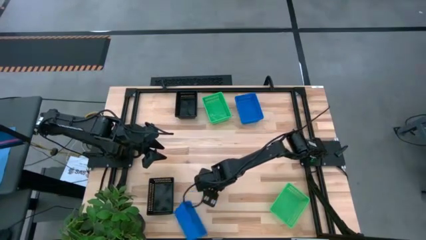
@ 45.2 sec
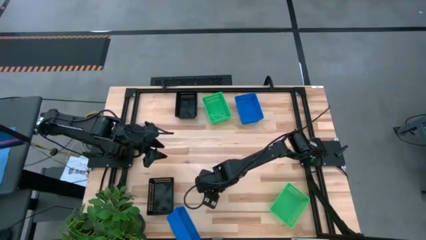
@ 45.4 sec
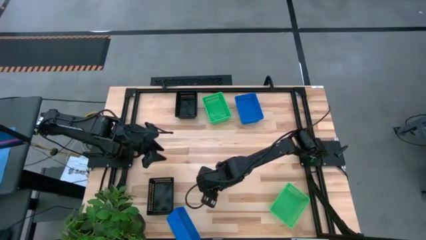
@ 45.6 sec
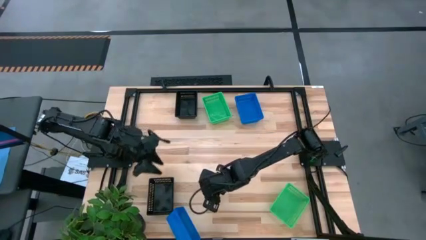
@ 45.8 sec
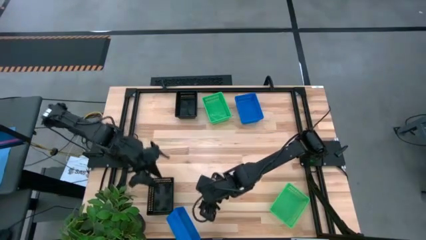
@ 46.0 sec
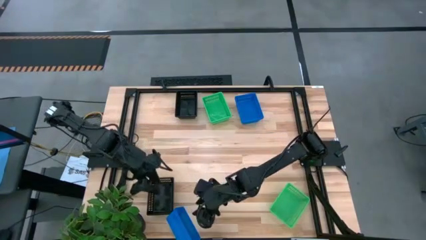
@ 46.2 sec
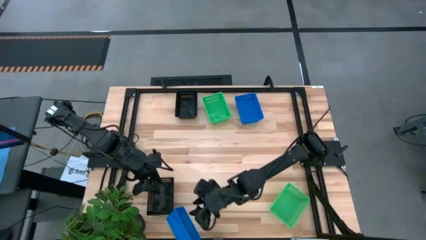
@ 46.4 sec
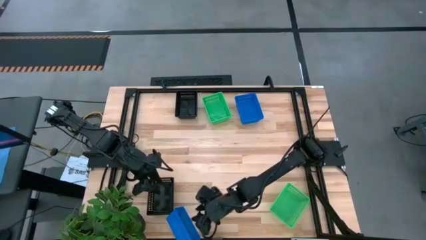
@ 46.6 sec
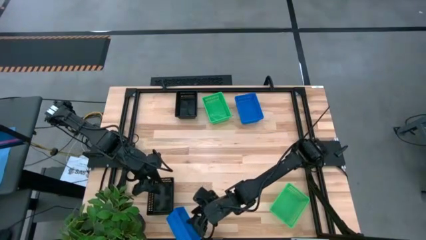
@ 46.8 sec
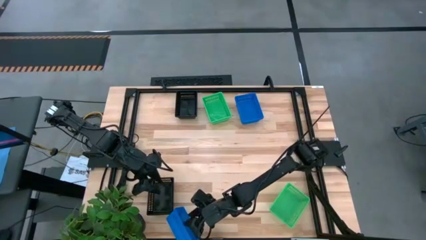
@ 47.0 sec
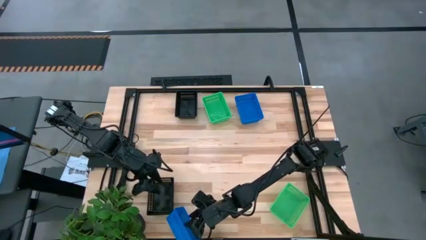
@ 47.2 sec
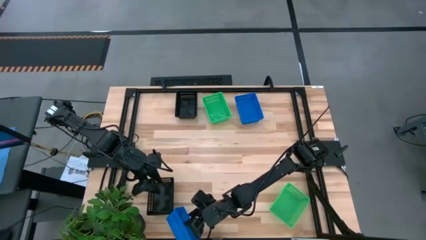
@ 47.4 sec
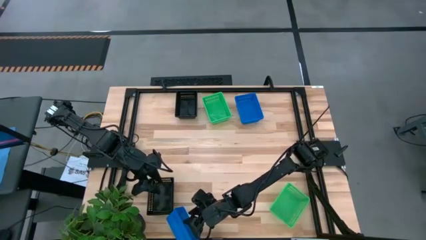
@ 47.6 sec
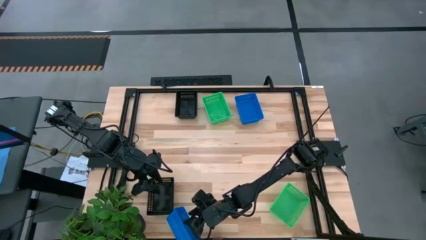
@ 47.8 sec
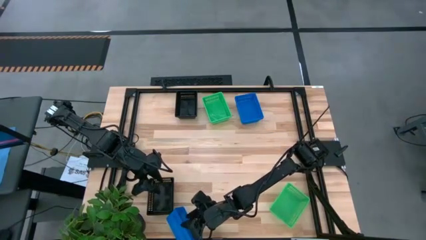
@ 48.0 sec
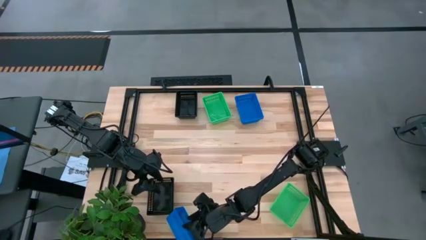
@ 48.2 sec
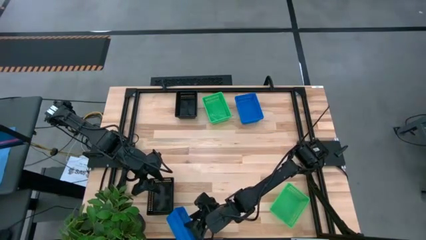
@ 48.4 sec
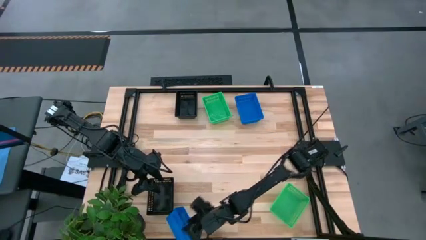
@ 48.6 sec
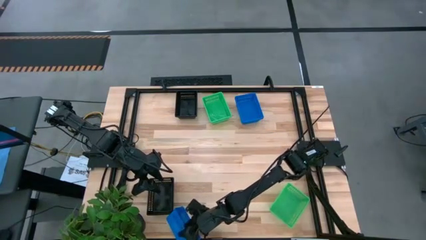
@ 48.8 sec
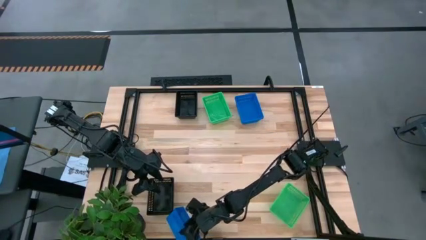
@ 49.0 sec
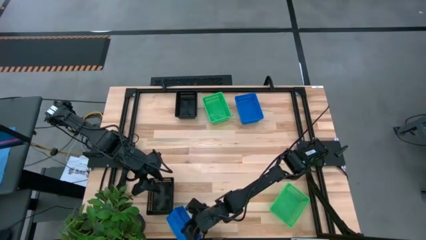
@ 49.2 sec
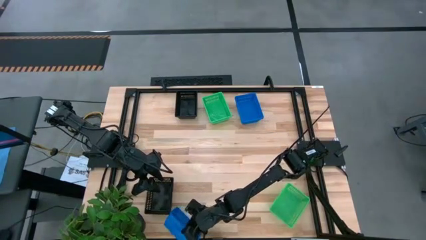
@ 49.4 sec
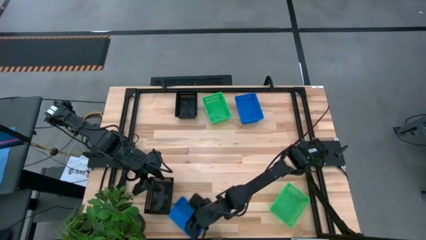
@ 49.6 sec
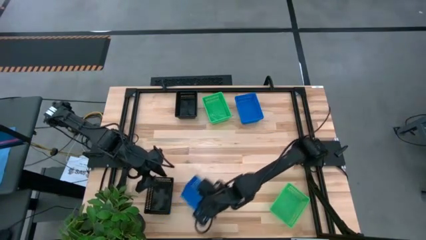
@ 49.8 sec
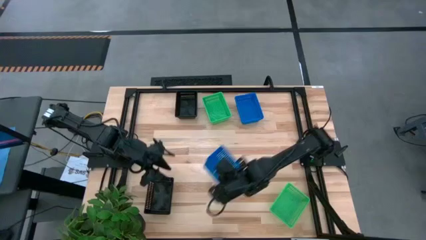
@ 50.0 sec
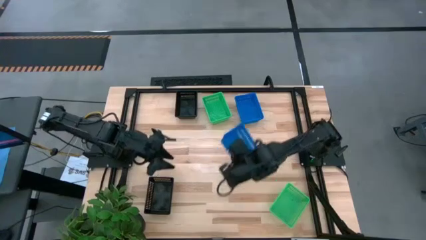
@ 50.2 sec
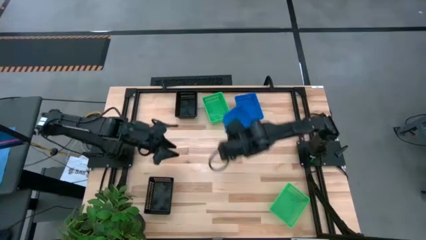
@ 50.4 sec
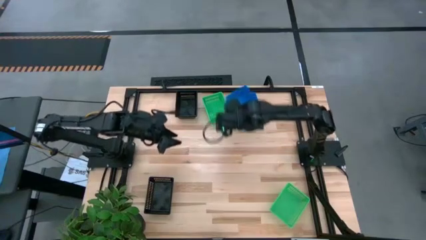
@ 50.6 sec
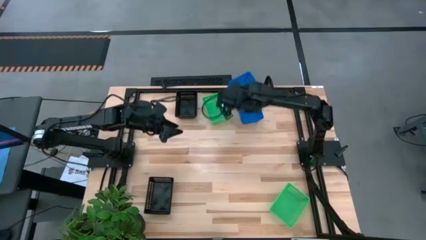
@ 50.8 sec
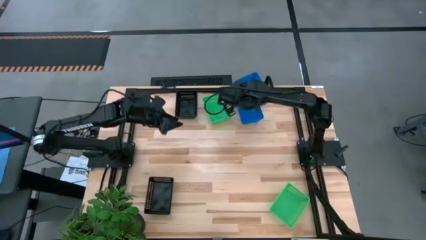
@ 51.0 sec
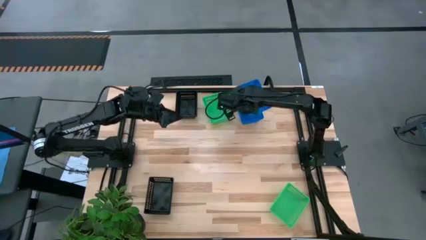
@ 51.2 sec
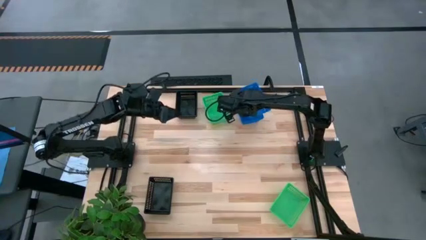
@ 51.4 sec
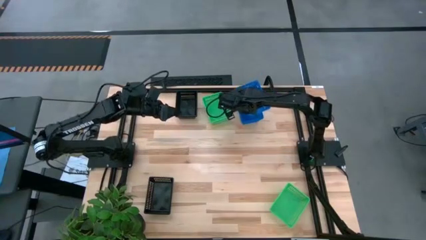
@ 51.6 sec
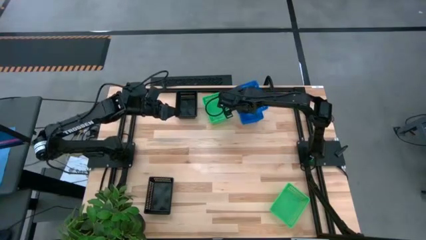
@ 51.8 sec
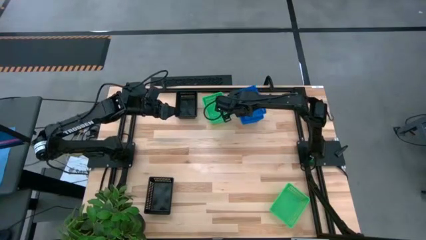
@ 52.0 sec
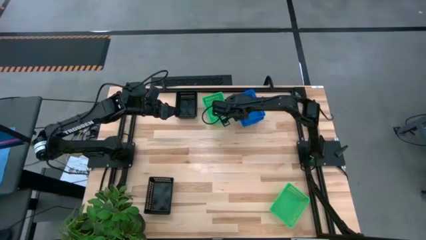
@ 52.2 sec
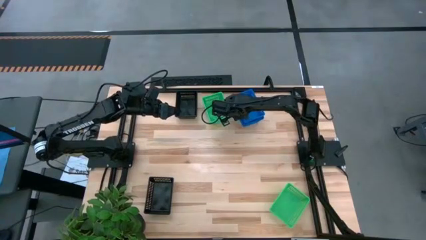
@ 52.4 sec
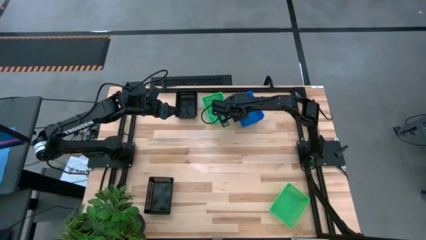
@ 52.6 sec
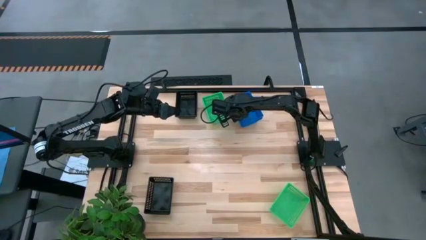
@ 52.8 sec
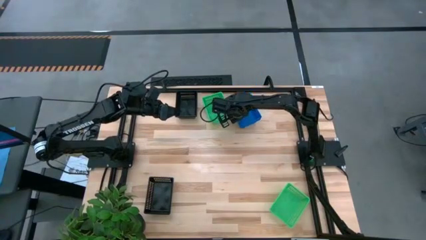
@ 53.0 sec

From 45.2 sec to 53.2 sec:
Stack the bottom blue bin on top of the top blue bins

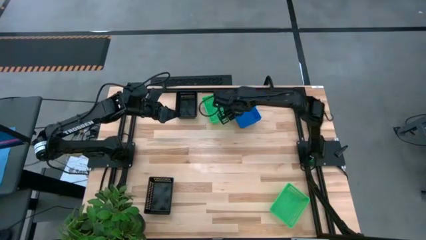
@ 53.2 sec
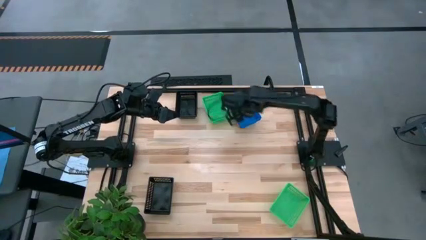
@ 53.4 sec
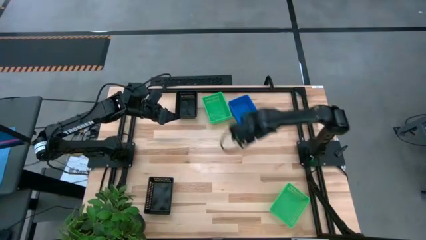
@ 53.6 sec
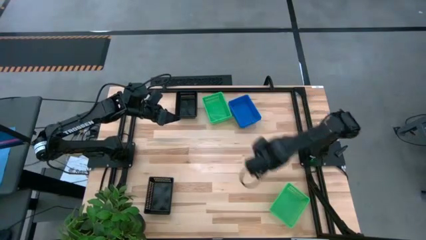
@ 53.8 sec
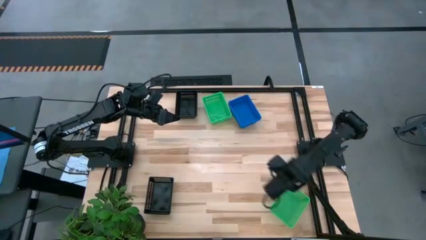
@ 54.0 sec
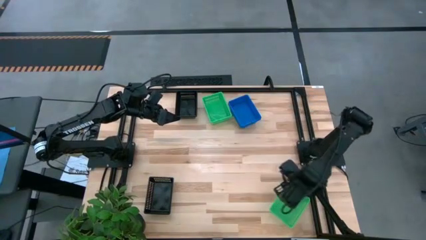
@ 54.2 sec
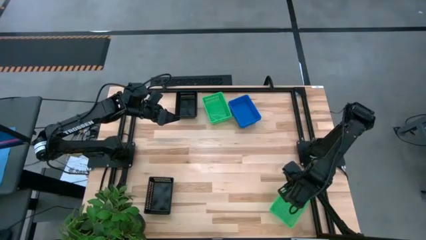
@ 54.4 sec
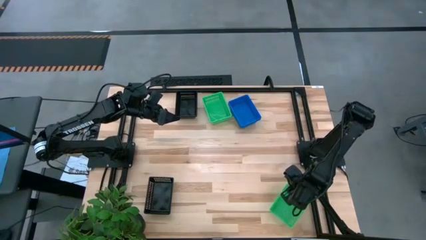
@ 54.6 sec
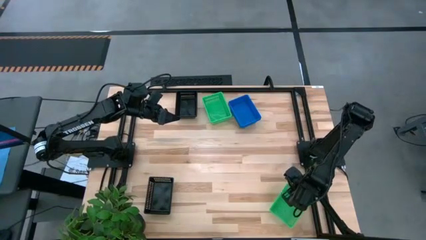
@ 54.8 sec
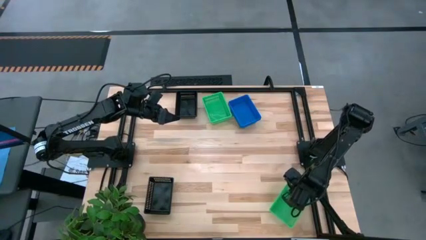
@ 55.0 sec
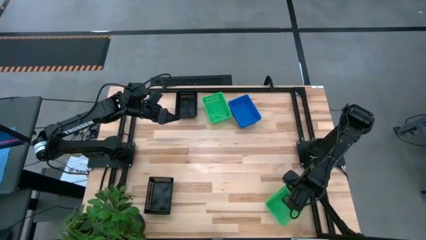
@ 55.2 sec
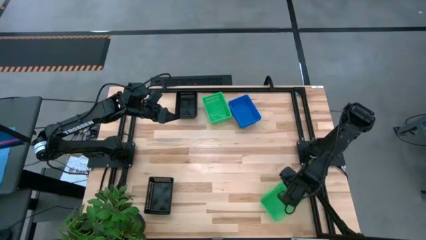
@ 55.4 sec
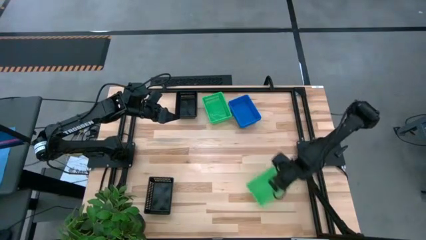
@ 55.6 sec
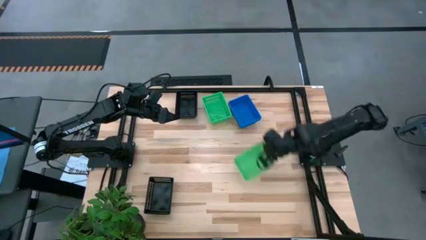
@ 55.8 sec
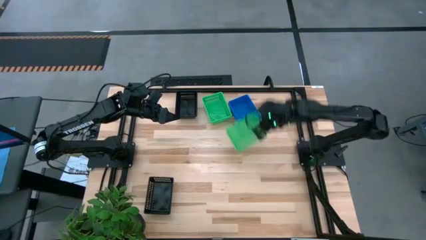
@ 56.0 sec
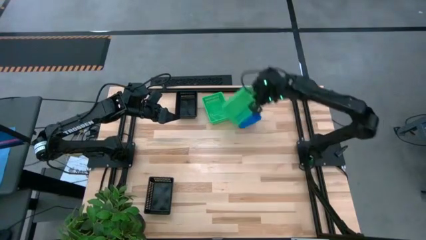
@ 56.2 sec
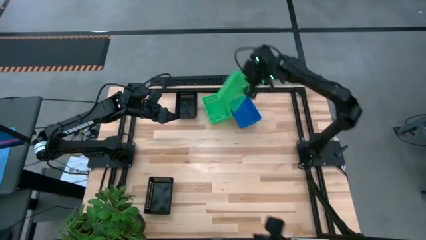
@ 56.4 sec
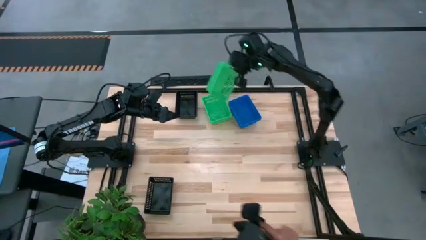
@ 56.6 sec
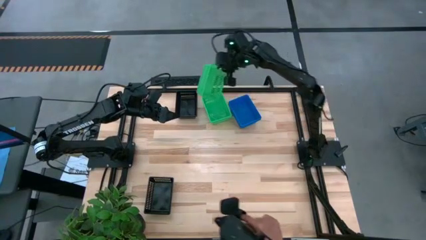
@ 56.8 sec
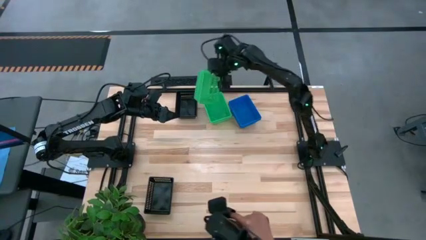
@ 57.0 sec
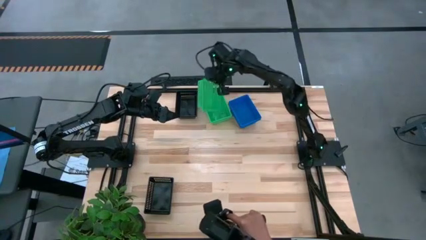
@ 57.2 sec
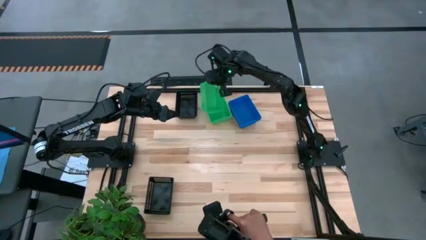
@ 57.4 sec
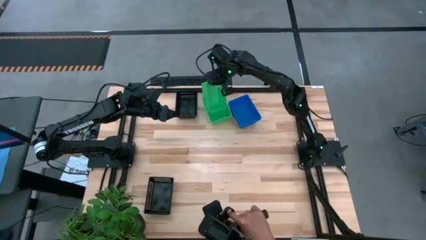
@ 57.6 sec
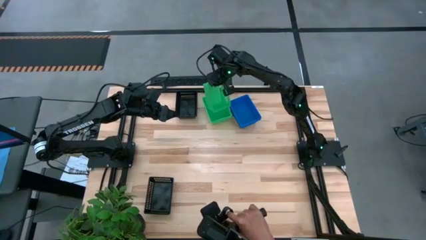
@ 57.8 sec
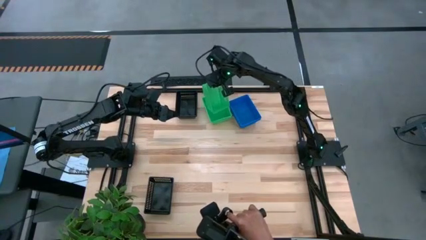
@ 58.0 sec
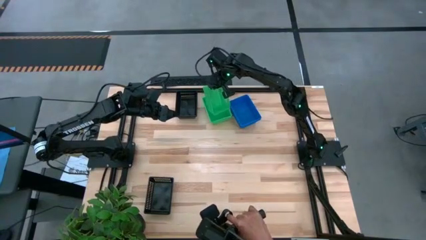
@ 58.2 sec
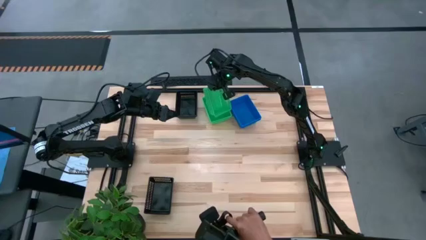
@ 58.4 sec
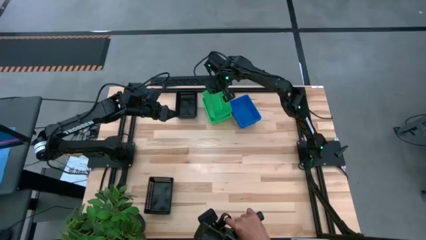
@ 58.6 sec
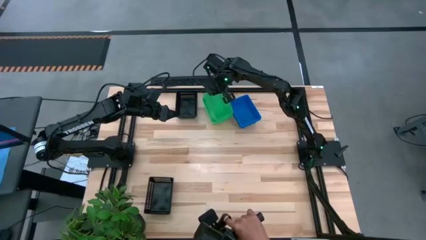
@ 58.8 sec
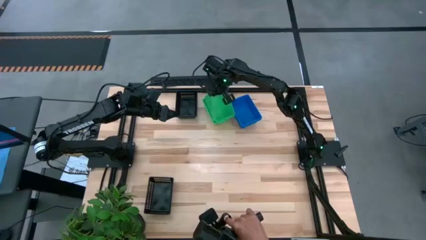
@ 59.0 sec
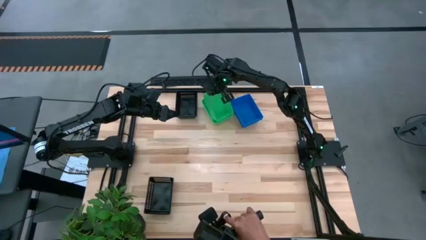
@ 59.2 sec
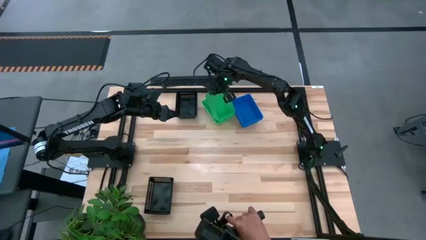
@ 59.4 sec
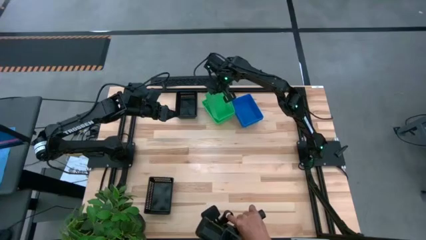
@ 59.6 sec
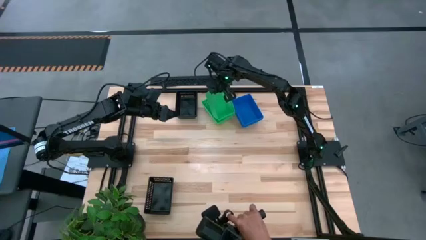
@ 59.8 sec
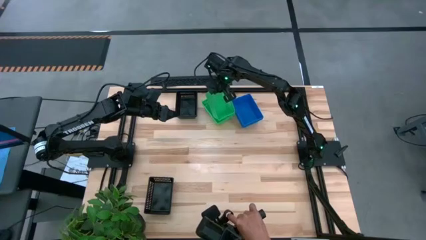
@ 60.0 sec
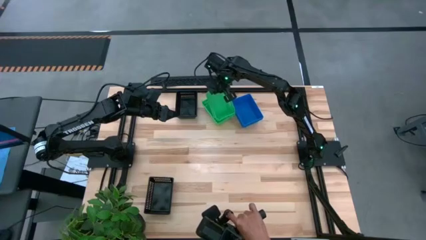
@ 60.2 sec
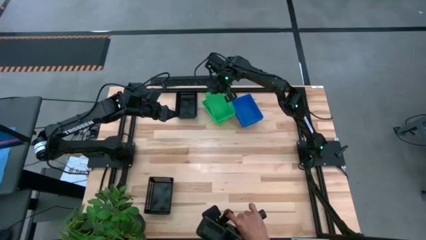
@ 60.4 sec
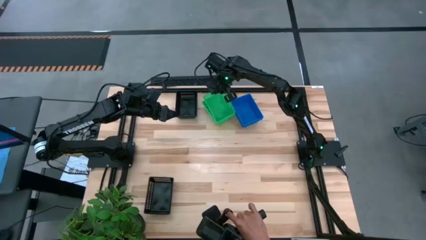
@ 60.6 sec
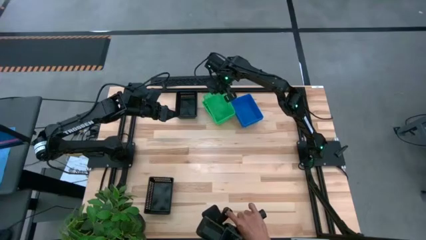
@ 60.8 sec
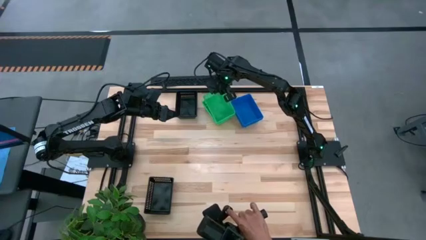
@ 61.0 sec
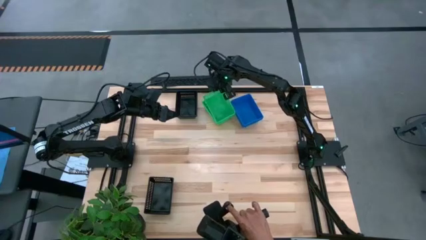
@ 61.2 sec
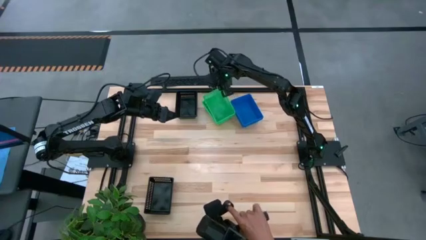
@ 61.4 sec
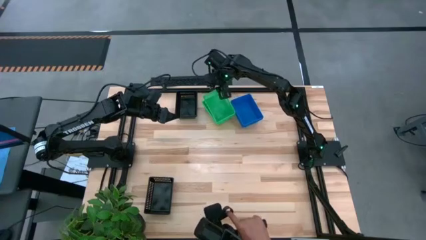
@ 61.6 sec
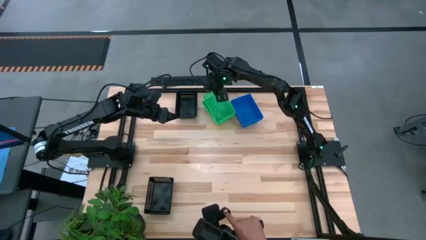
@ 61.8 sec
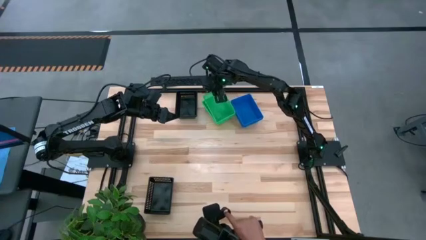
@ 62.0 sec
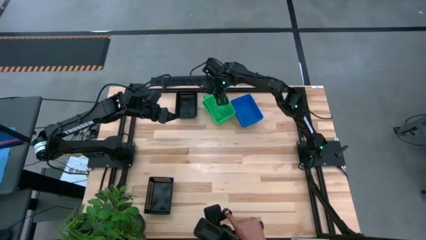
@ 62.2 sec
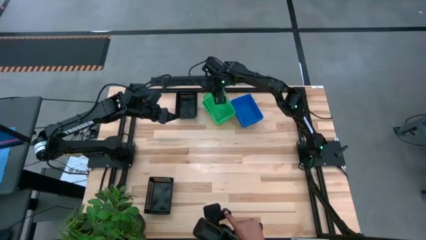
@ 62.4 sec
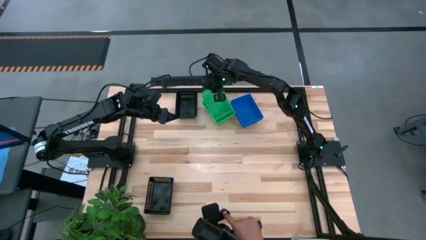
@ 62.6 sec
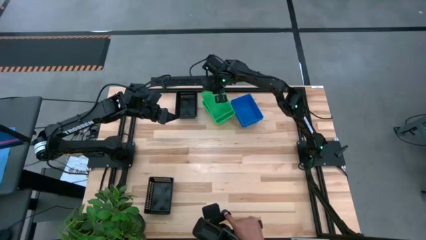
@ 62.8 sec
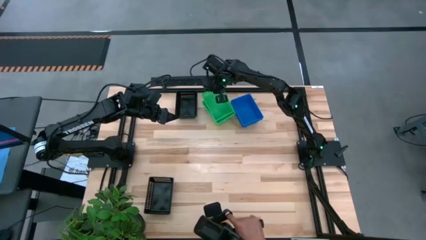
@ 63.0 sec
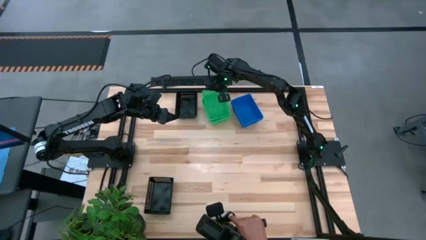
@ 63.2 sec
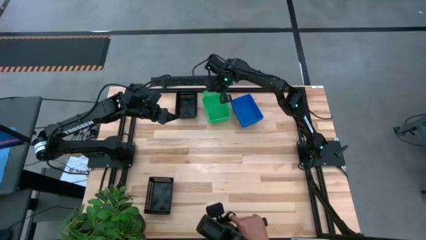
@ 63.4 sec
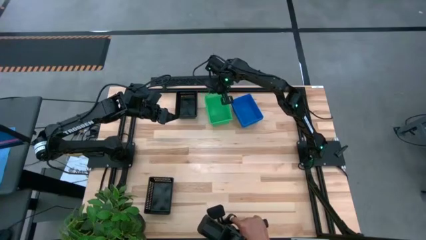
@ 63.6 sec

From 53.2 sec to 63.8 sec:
Stack the bottom green bin on top of the top green bins
